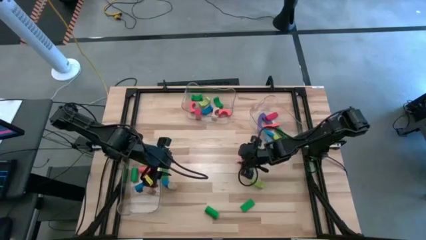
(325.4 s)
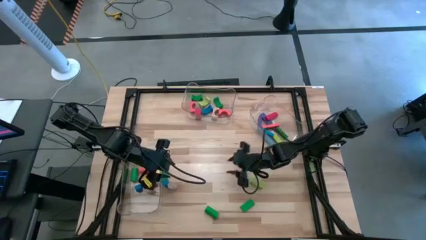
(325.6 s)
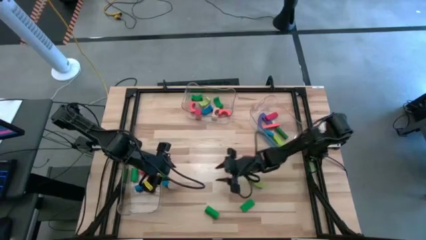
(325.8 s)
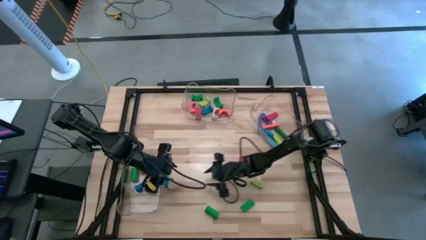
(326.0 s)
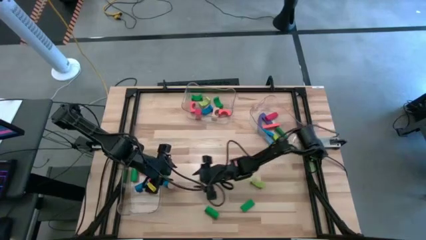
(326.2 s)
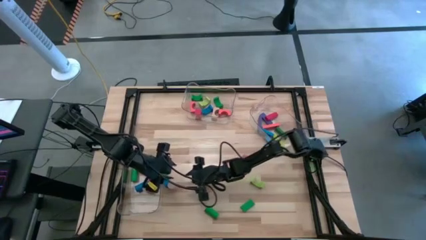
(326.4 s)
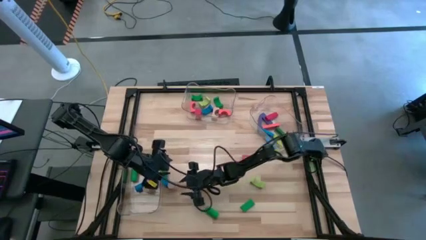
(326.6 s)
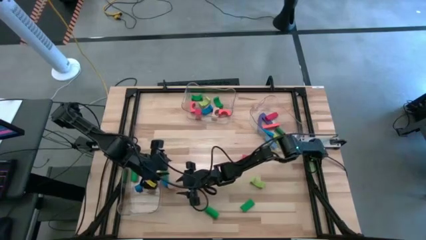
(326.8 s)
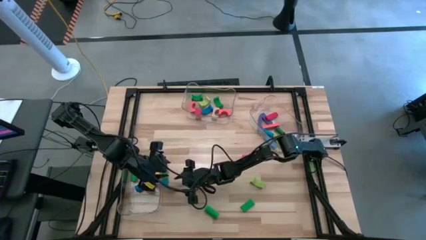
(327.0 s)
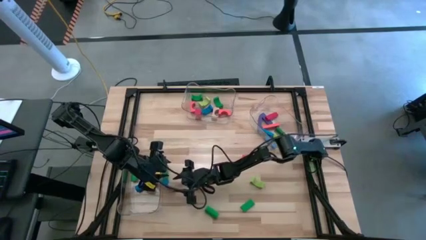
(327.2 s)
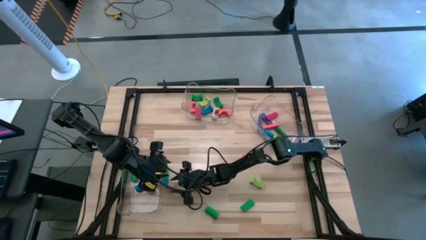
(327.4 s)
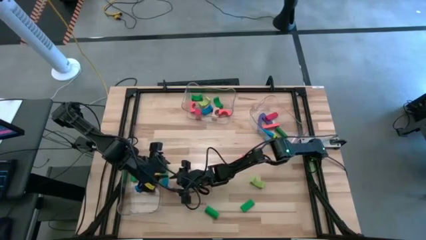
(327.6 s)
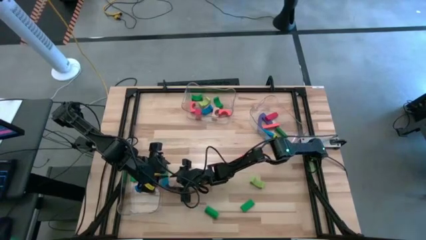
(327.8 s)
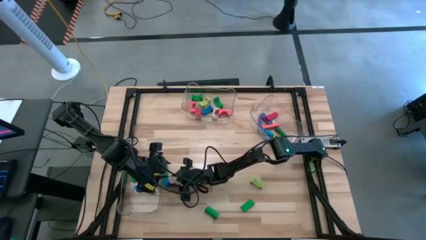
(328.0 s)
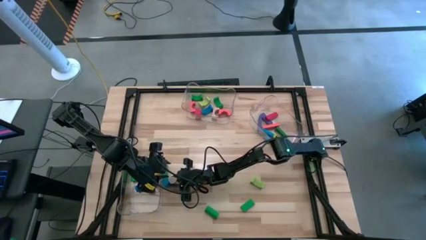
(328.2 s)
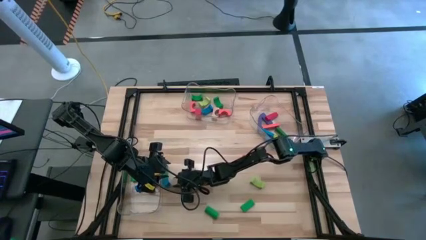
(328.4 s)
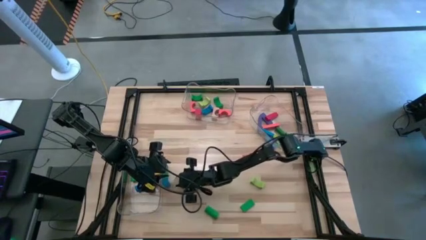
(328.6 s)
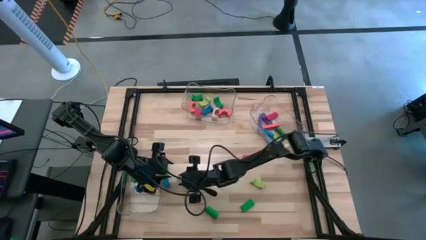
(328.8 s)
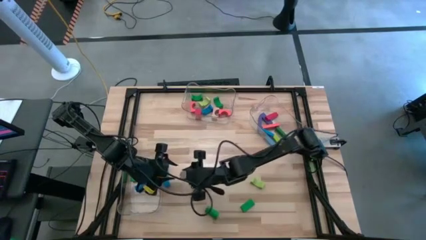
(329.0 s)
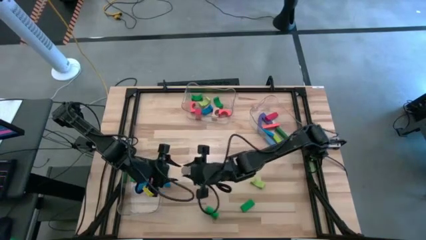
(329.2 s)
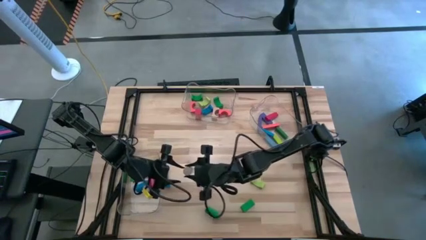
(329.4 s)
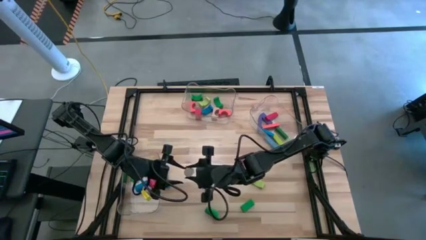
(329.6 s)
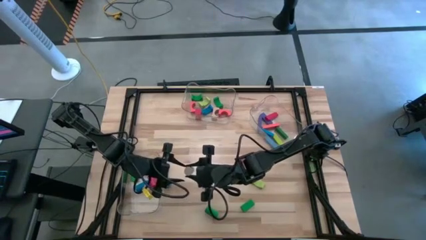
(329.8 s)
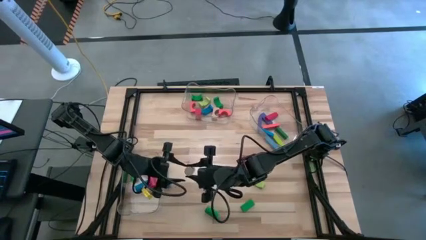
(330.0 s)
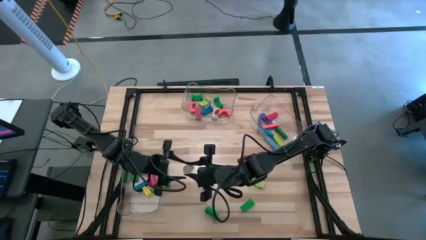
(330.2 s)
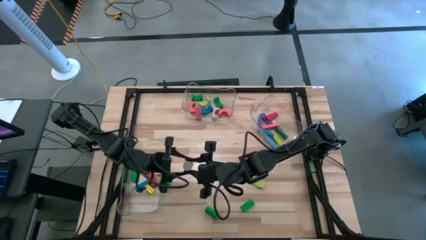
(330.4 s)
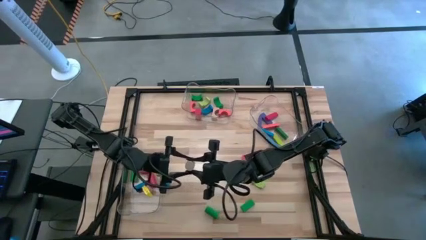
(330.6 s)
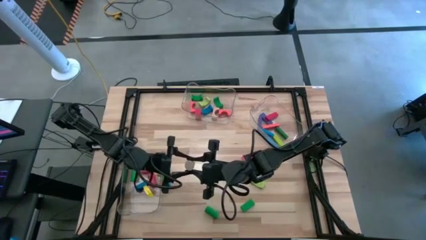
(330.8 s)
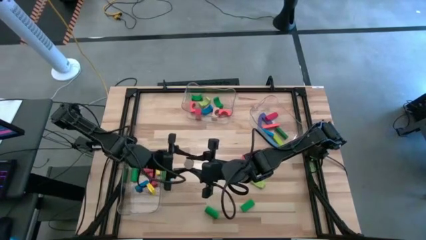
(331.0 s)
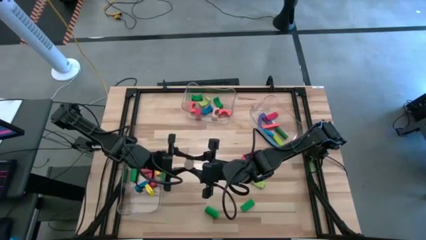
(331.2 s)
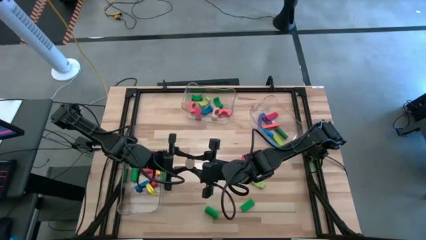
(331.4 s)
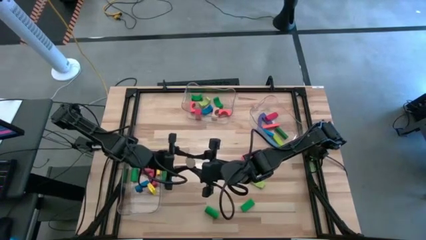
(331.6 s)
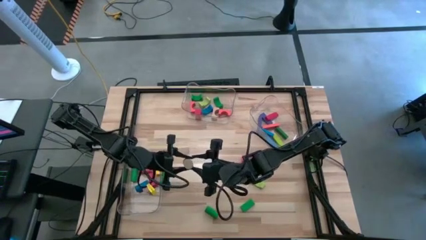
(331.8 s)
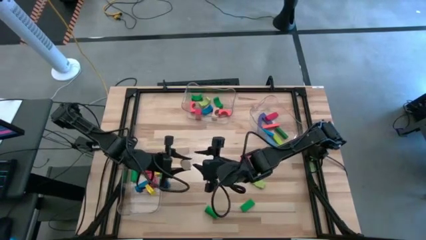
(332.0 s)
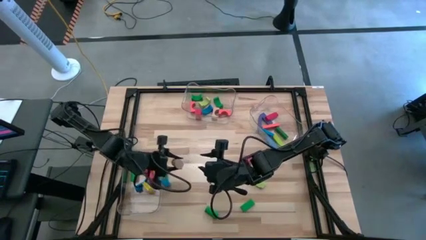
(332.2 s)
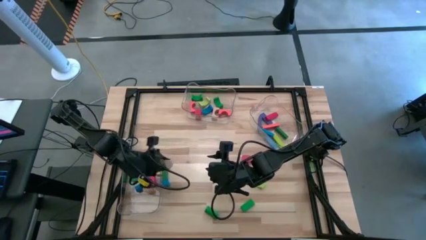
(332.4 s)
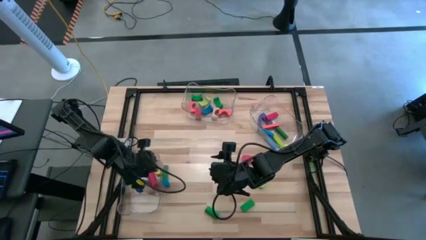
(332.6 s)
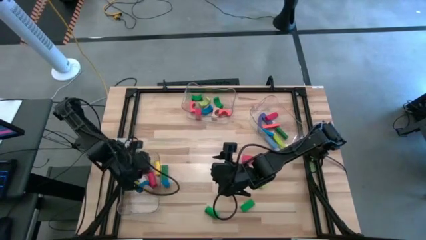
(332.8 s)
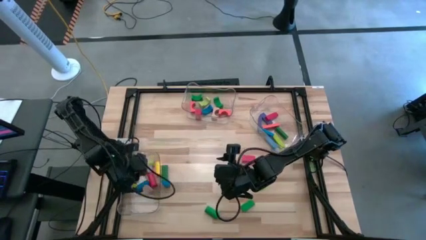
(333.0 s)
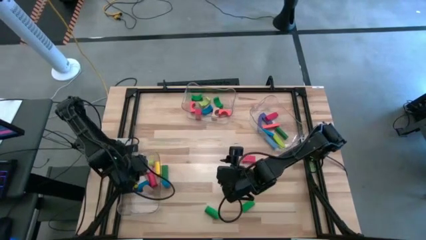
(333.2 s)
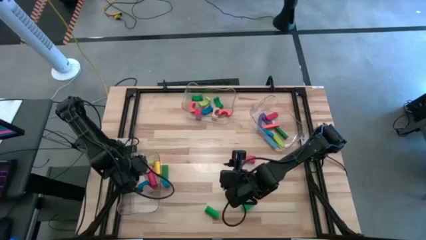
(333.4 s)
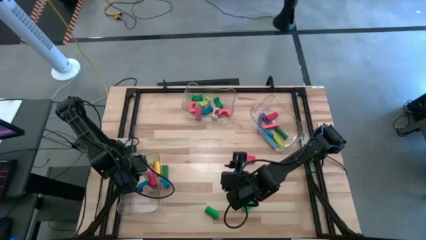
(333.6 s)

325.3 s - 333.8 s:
Task: Sort blocks by size
Put the brown cylindrical block into the left transparent bin

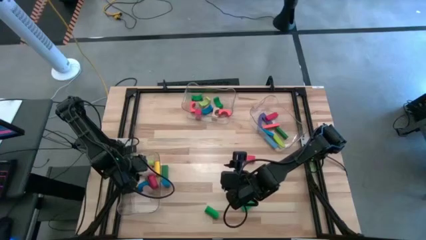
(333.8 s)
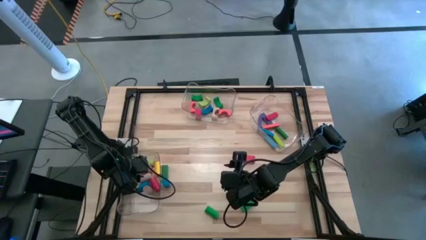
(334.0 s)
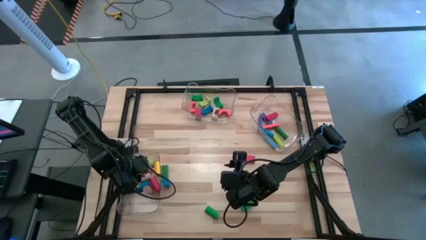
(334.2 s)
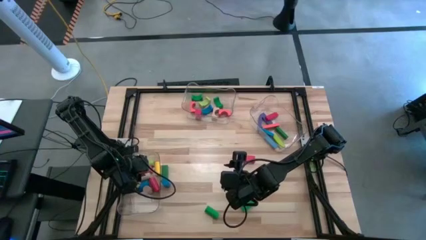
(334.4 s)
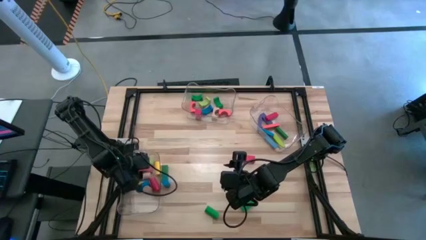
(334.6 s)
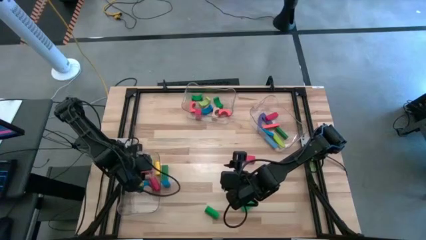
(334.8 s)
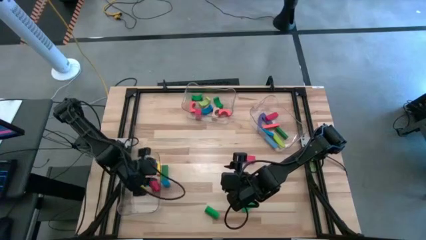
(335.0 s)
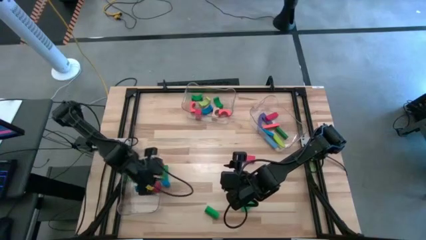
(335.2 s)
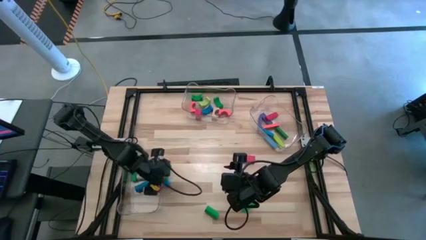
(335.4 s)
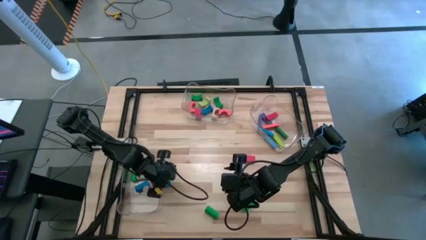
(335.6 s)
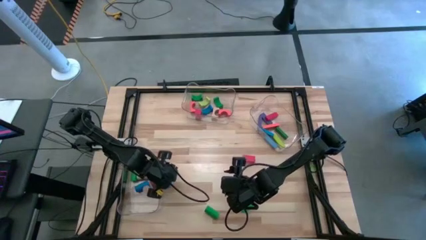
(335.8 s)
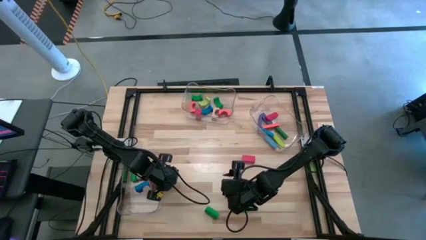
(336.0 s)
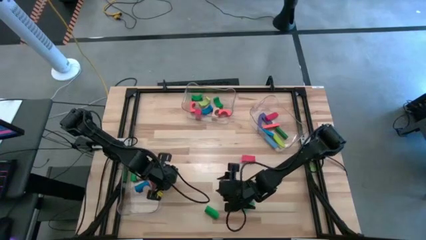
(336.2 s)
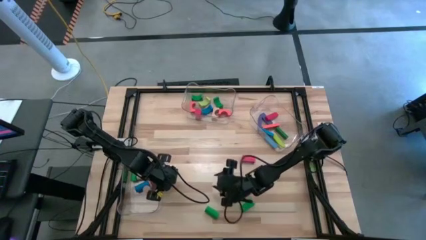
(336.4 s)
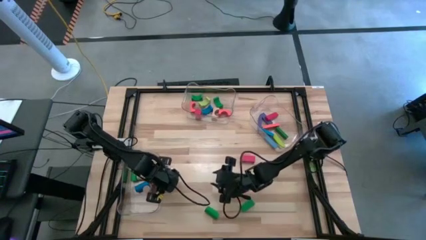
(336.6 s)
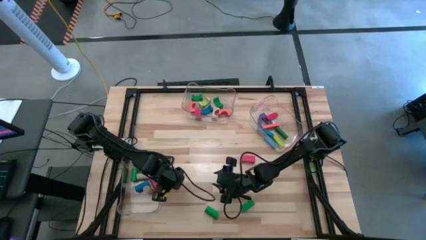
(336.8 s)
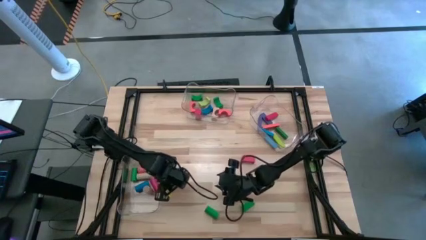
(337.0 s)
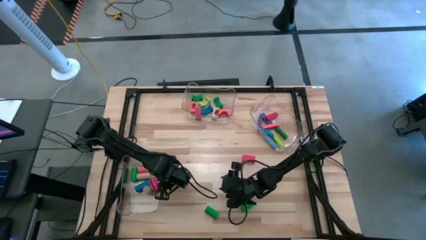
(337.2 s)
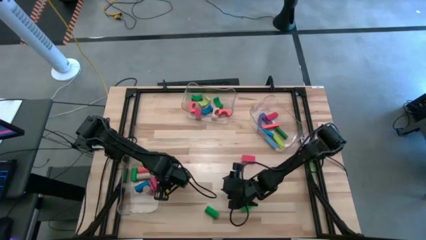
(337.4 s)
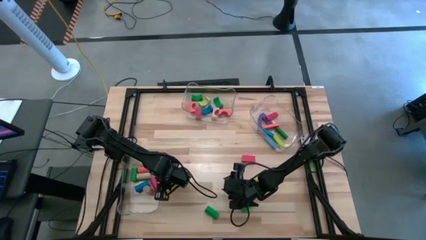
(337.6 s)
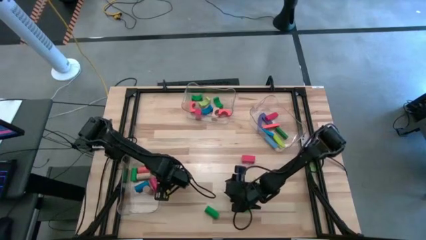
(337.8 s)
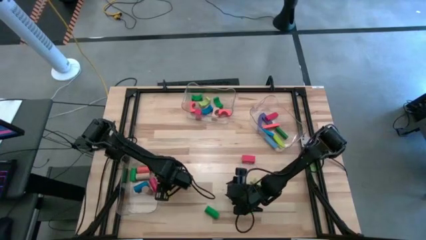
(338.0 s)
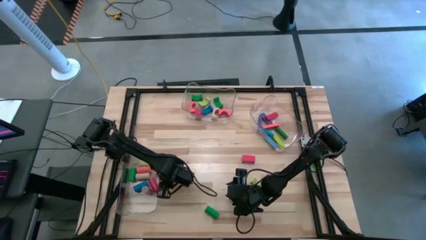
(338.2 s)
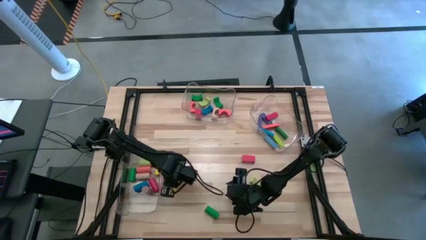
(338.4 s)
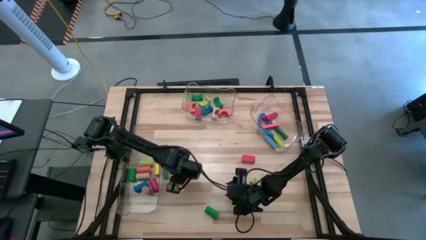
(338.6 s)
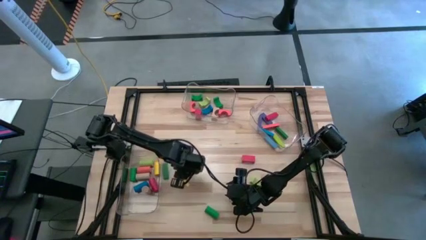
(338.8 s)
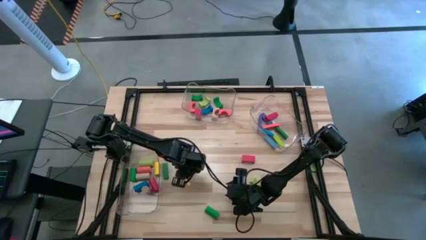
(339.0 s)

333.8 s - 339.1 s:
Move the blue cylindrical block to the center of the table
